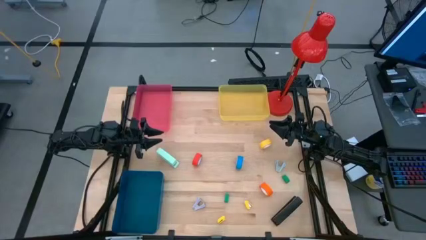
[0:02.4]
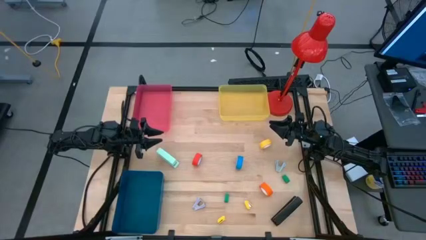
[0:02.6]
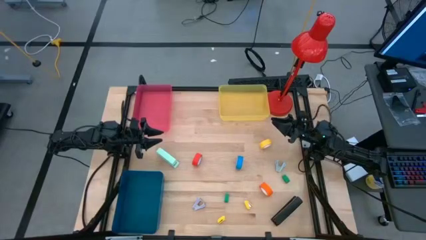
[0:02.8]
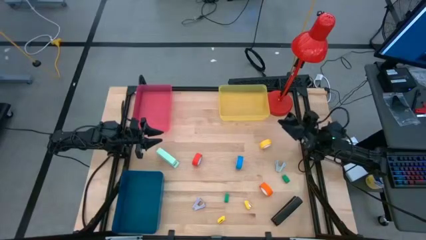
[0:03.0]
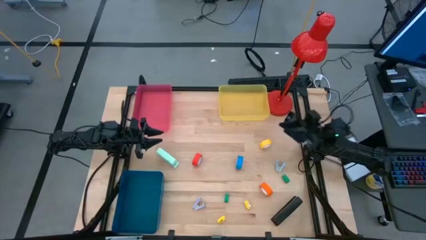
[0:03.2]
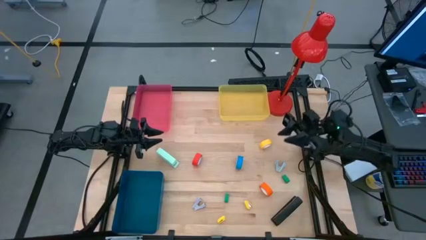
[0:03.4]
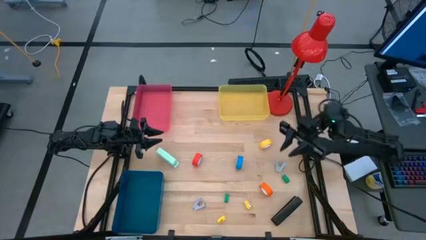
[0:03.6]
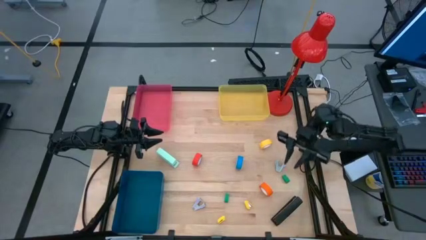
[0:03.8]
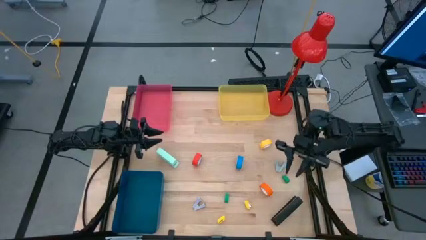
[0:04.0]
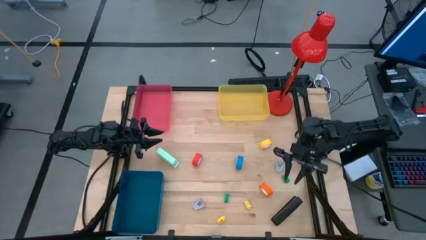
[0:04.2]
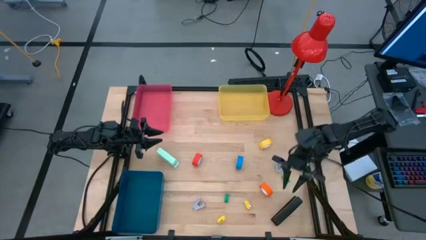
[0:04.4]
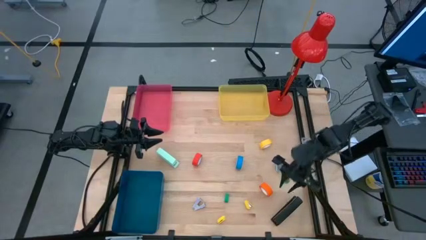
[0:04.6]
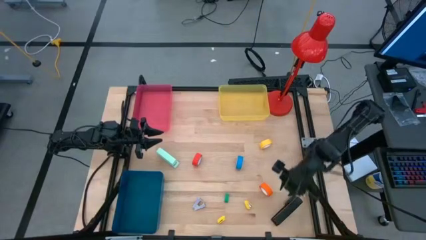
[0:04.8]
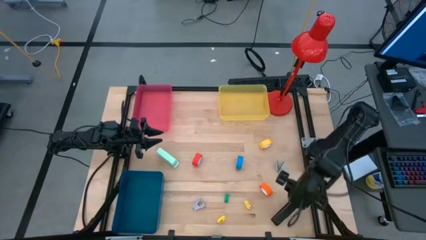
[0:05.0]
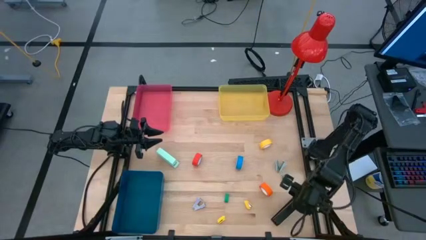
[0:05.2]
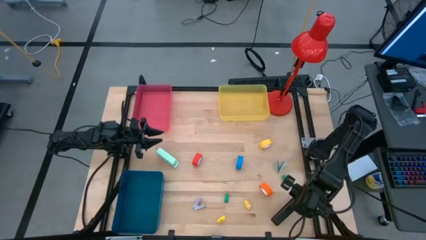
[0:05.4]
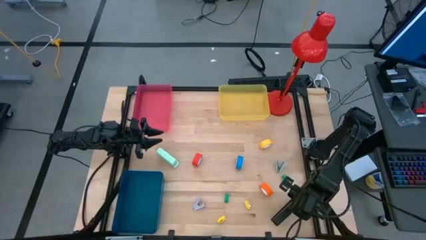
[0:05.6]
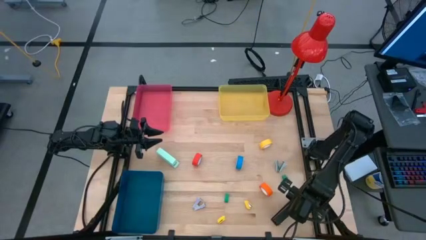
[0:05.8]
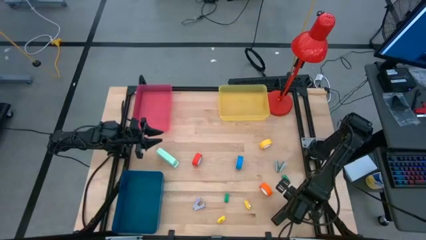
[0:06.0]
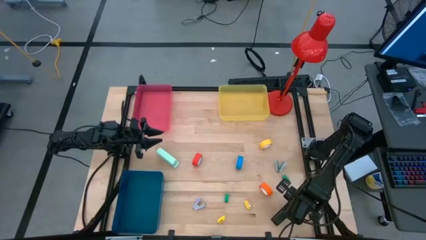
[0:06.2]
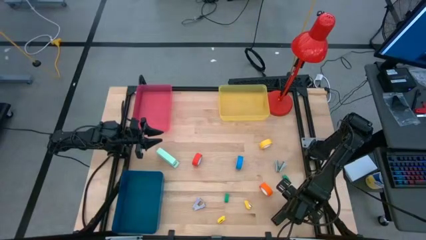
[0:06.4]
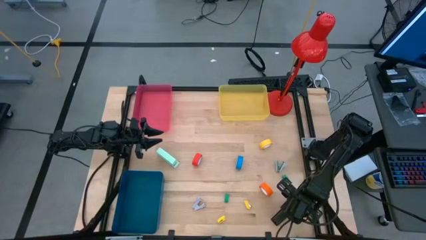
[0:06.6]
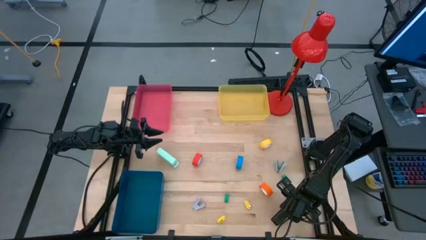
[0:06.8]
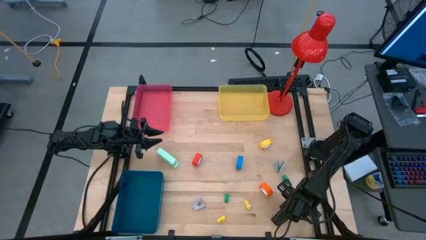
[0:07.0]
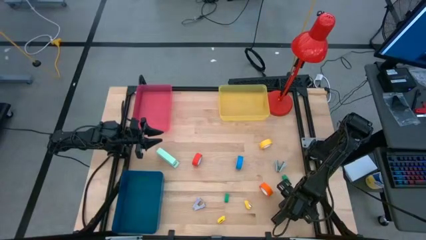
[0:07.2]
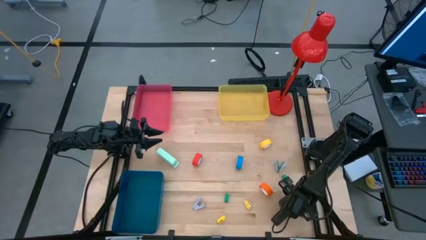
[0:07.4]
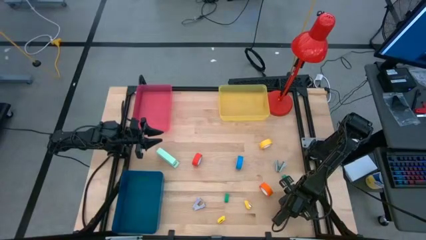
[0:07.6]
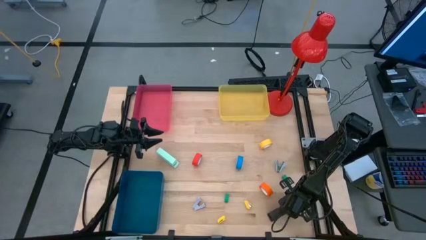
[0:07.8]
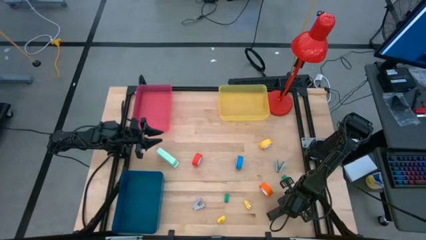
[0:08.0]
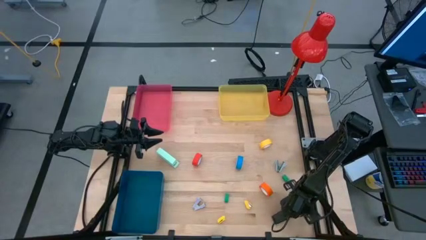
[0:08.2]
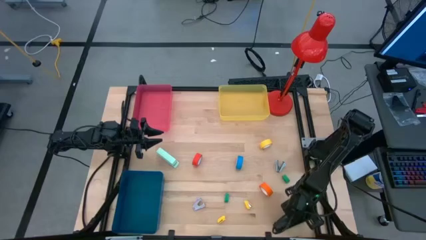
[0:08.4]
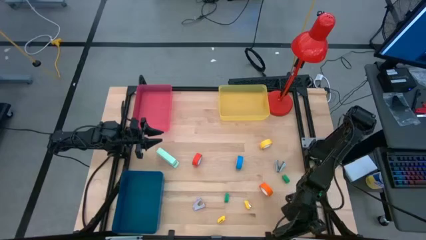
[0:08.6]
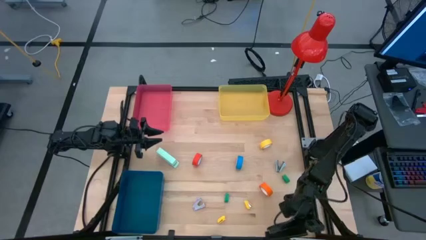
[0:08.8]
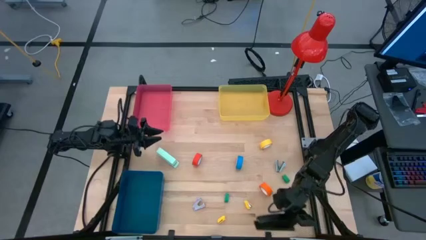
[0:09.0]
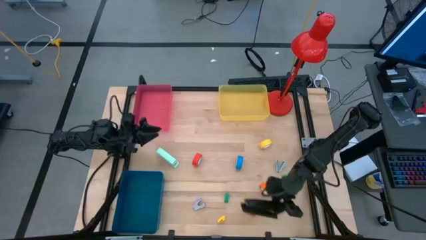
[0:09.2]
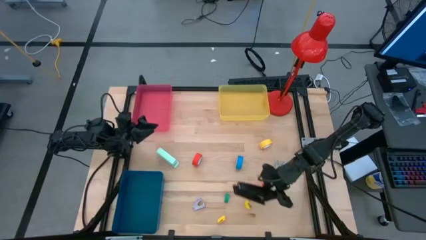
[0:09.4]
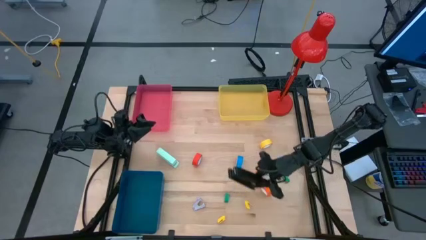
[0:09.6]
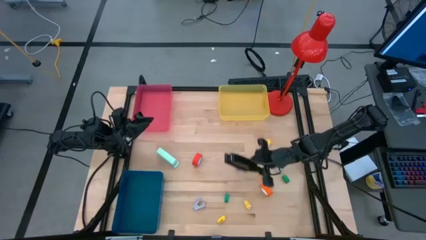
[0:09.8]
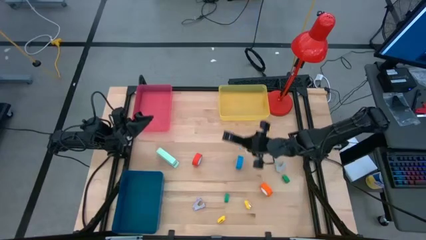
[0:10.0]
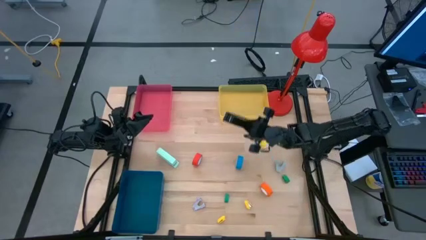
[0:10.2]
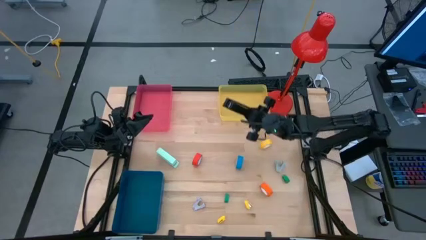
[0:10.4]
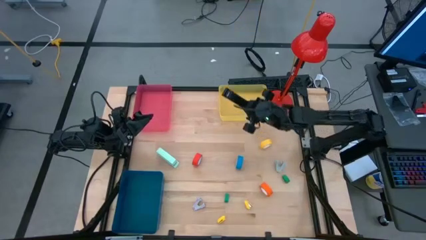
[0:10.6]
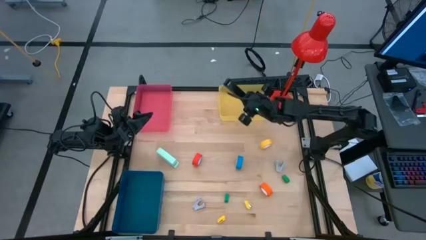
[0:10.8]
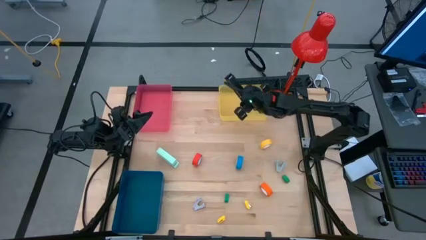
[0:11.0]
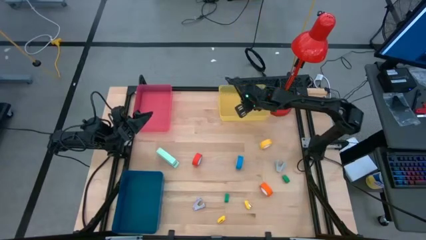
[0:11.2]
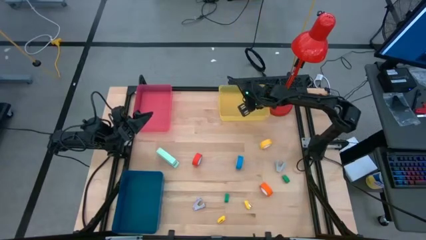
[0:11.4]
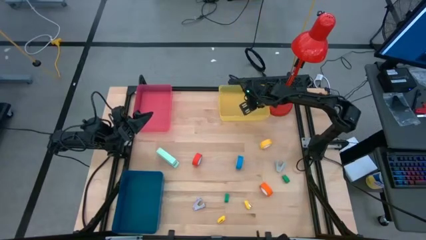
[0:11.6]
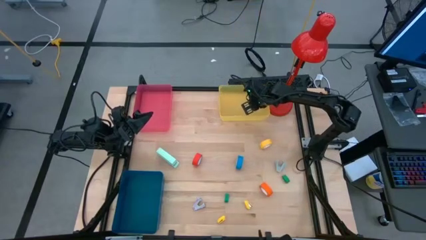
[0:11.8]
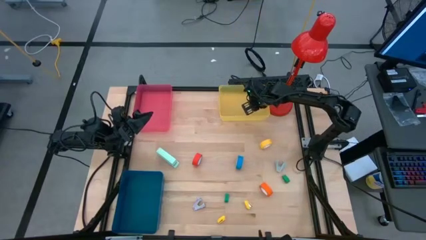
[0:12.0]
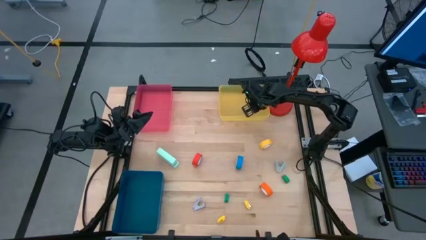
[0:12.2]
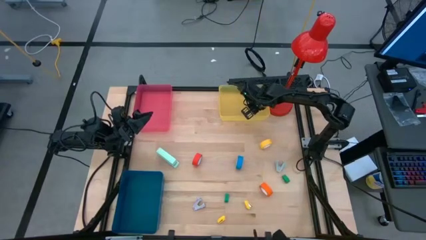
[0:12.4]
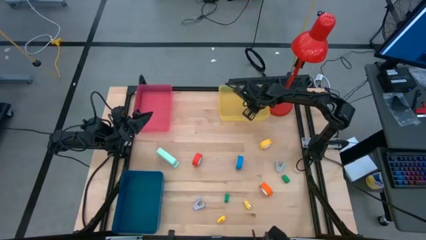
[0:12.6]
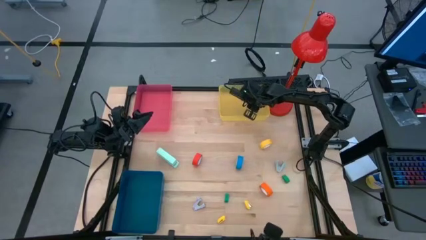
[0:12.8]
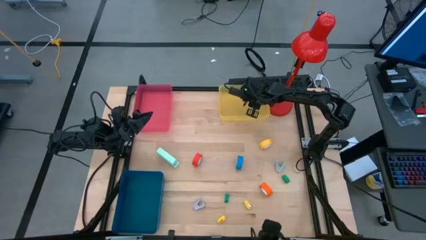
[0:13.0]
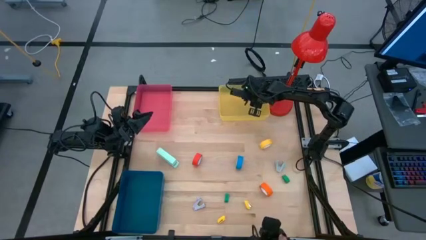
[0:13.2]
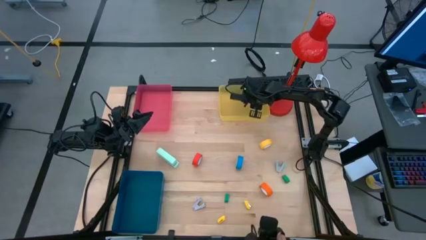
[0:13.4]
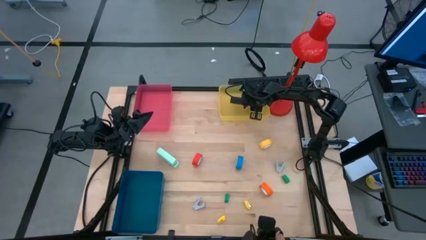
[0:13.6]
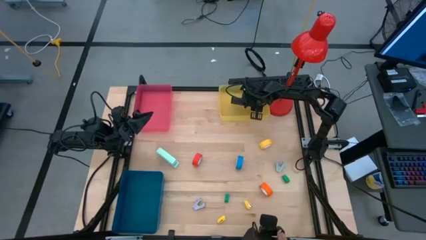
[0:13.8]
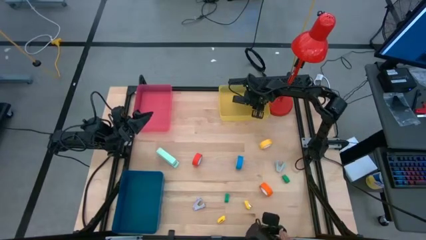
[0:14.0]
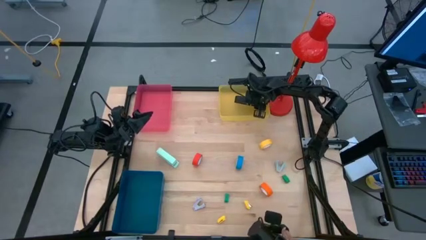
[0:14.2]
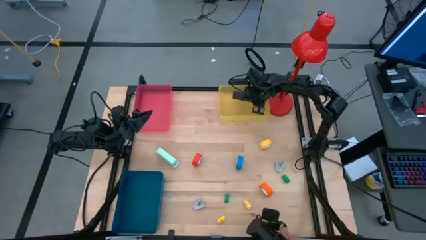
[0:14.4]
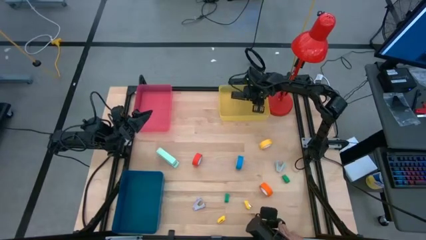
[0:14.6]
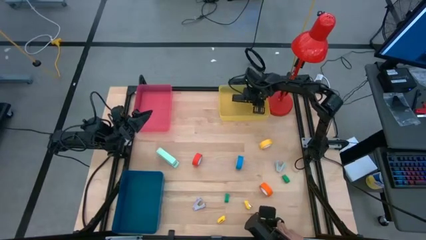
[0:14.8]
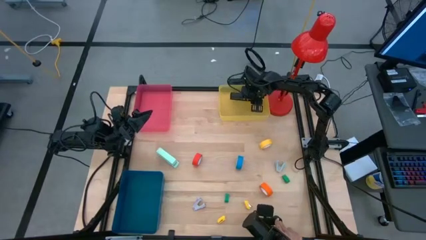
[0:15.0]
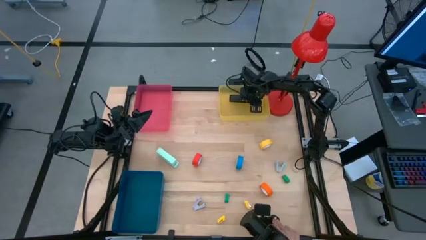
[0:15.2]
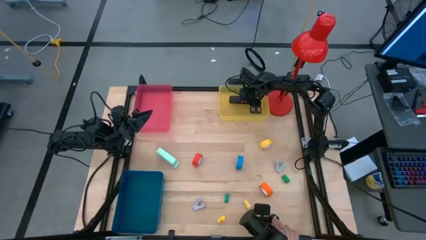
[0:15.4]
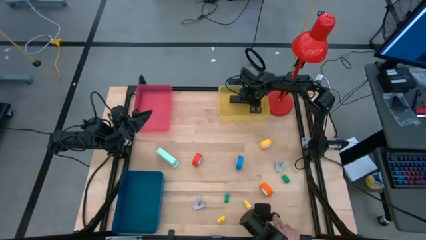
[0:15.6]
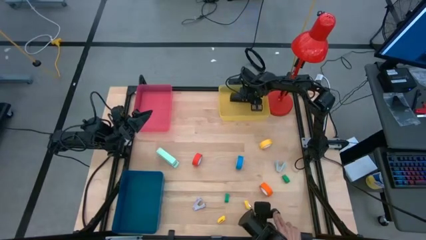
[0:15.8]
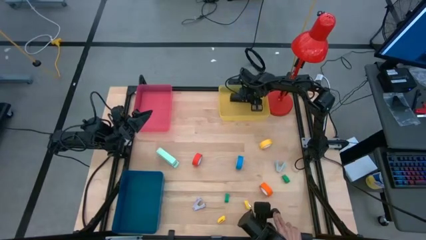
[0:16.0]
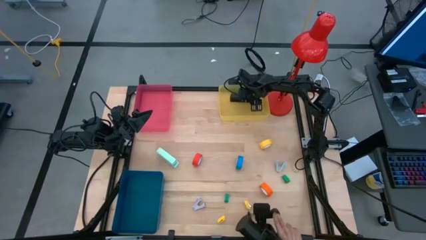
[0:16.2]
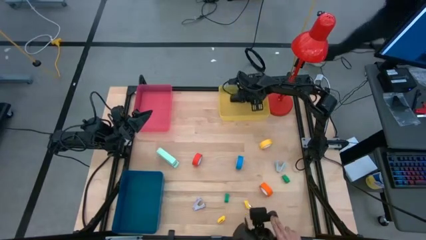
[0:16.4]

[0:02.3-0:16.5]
Task: Pick and place Stapler, Stapler remover, tape
Put the big black stapler into the yellow bin
